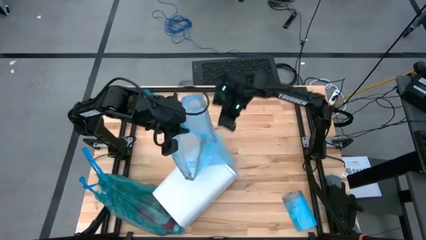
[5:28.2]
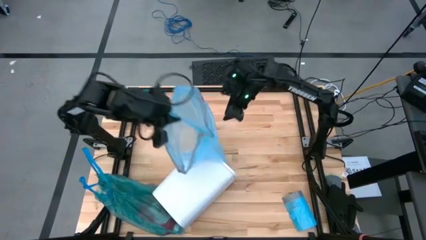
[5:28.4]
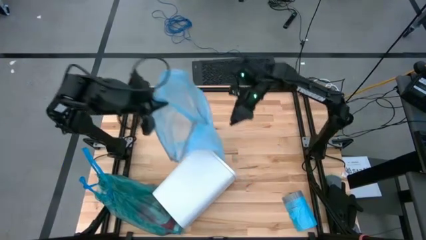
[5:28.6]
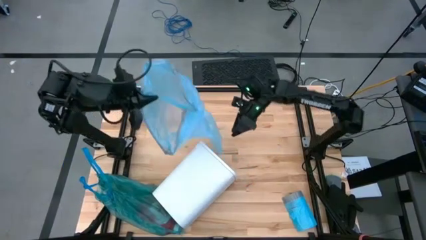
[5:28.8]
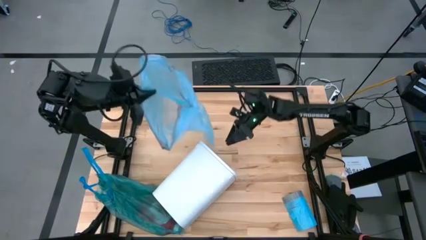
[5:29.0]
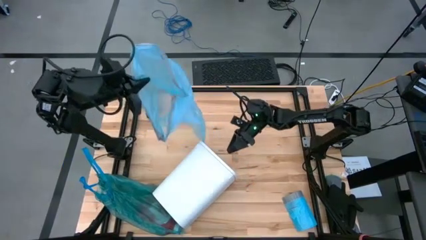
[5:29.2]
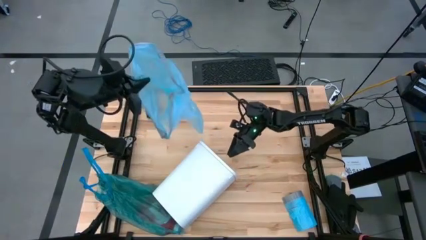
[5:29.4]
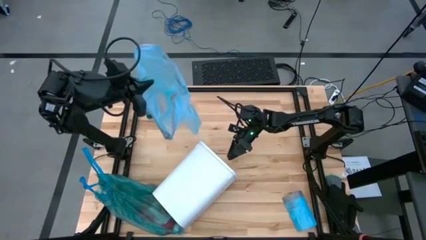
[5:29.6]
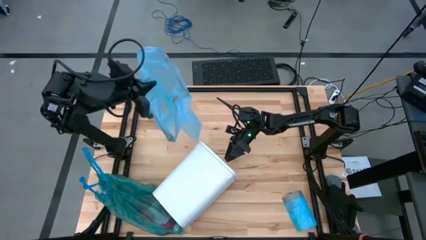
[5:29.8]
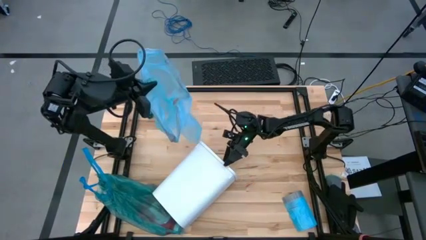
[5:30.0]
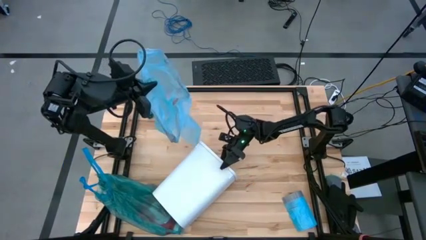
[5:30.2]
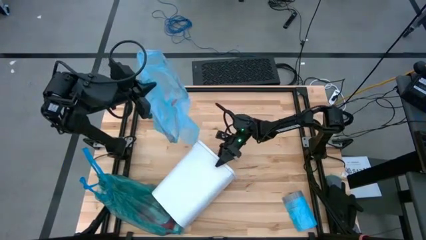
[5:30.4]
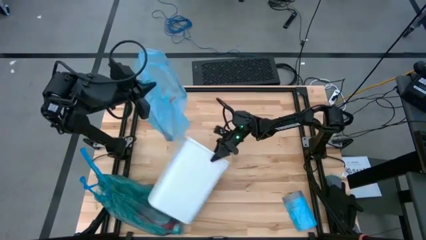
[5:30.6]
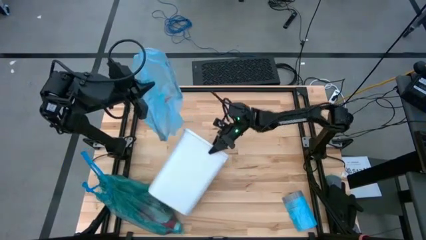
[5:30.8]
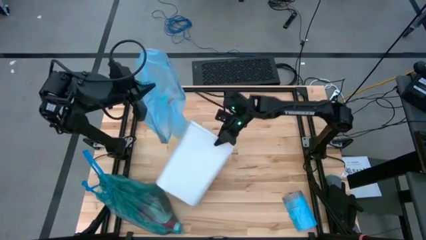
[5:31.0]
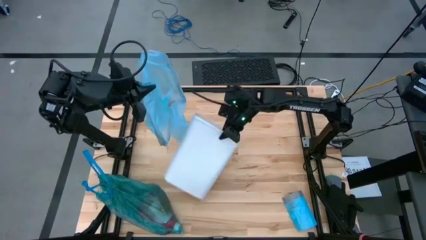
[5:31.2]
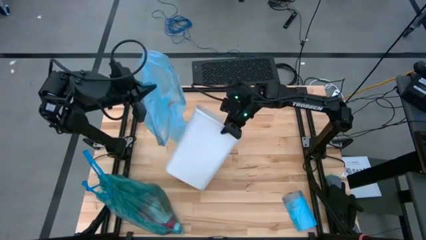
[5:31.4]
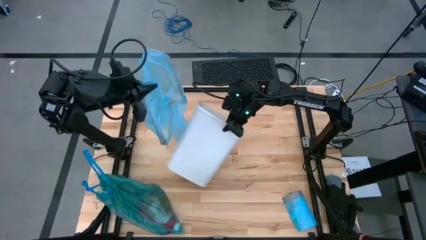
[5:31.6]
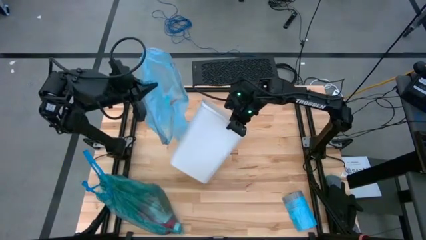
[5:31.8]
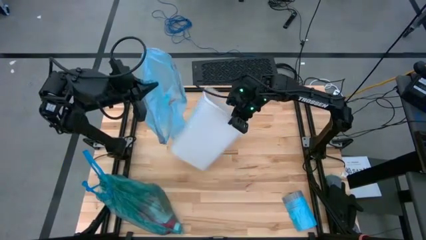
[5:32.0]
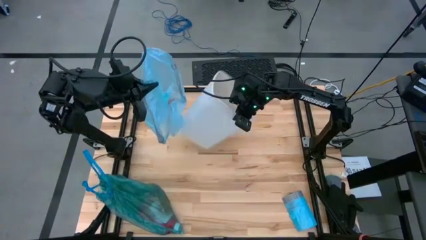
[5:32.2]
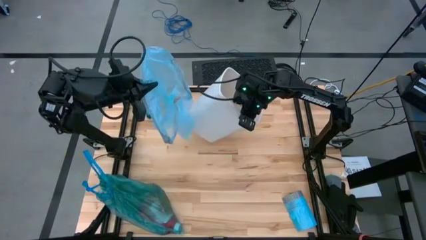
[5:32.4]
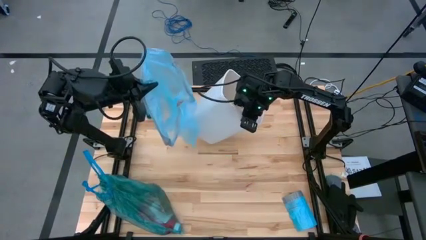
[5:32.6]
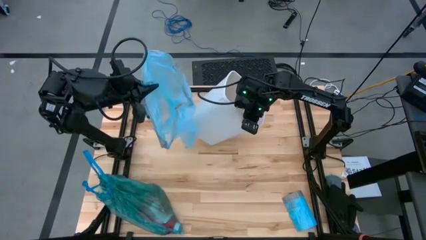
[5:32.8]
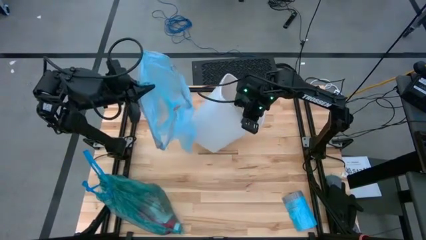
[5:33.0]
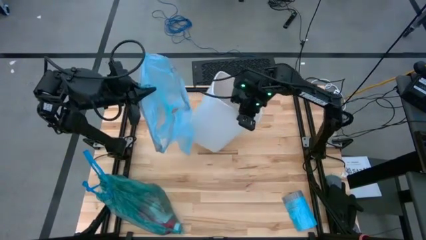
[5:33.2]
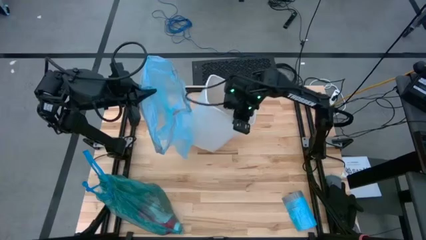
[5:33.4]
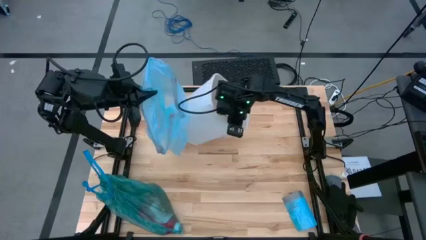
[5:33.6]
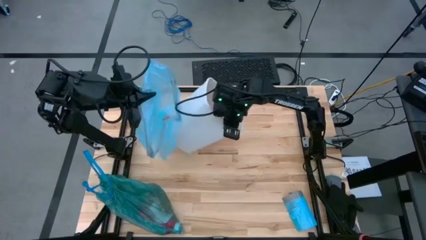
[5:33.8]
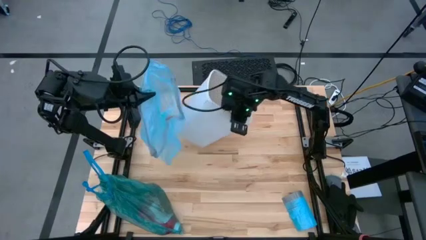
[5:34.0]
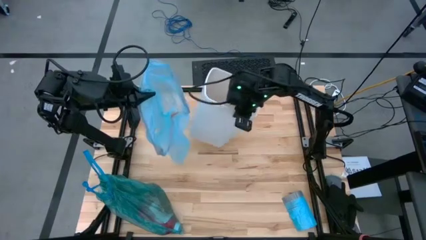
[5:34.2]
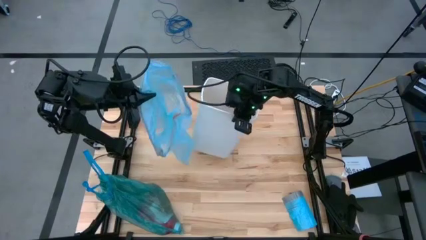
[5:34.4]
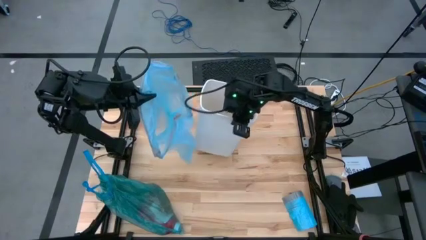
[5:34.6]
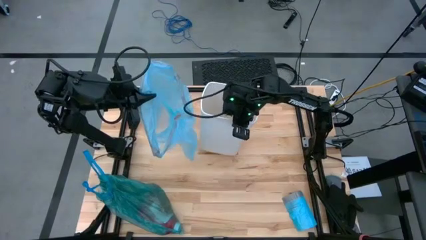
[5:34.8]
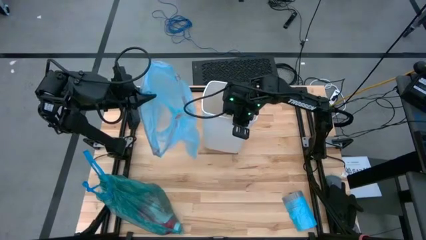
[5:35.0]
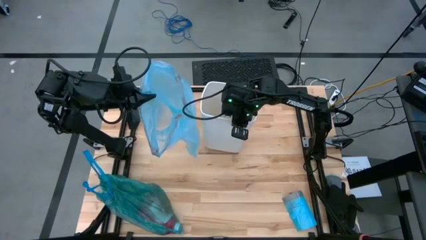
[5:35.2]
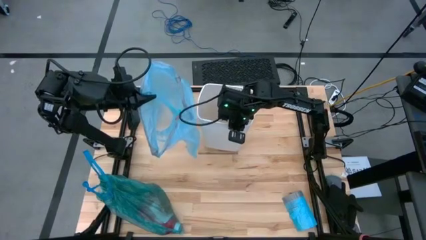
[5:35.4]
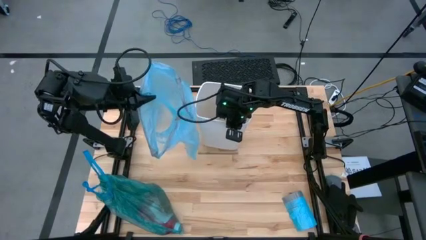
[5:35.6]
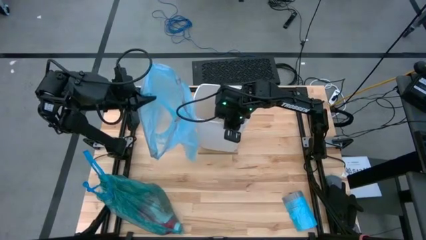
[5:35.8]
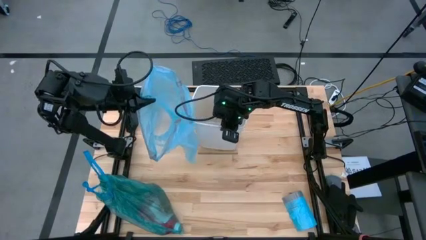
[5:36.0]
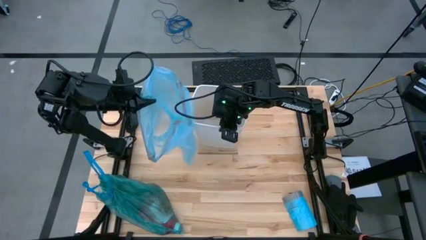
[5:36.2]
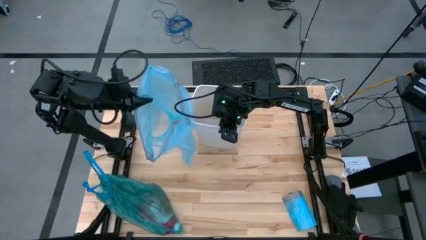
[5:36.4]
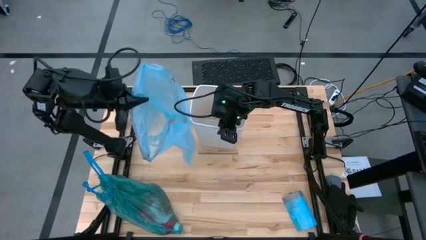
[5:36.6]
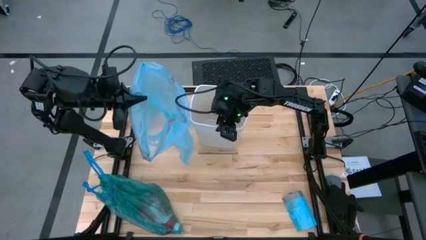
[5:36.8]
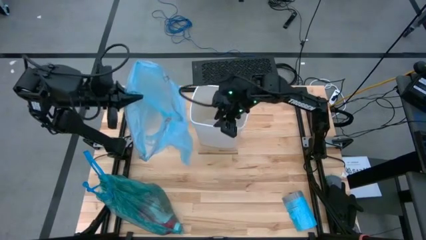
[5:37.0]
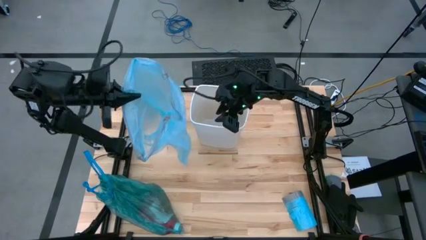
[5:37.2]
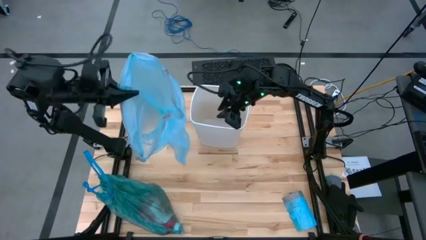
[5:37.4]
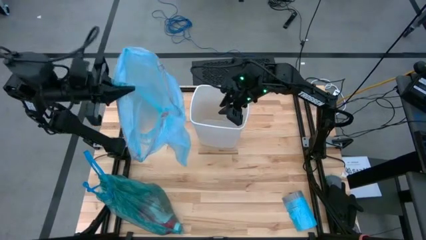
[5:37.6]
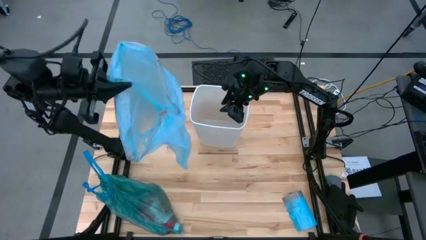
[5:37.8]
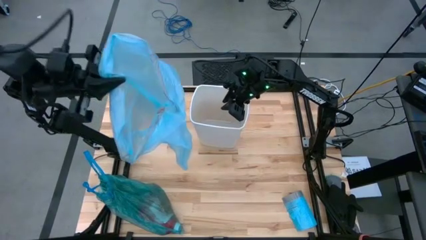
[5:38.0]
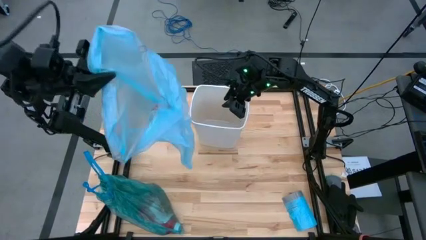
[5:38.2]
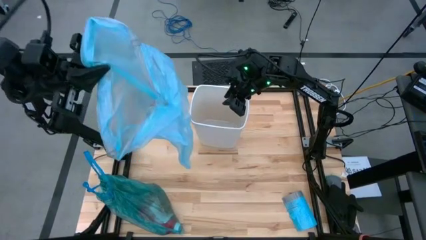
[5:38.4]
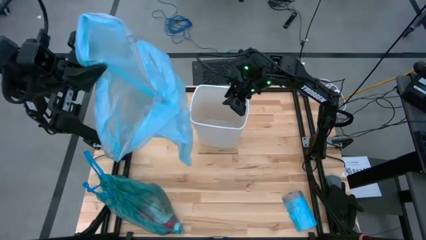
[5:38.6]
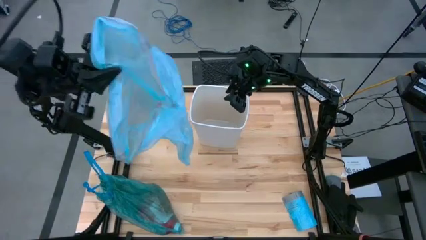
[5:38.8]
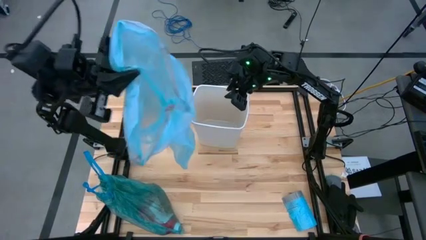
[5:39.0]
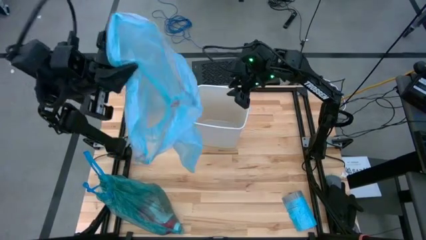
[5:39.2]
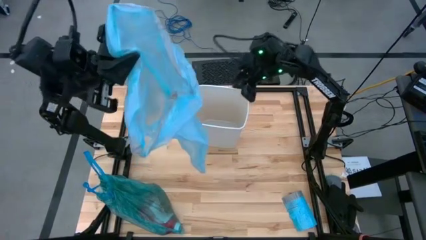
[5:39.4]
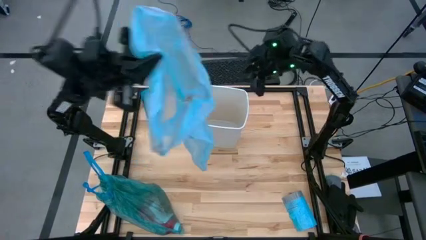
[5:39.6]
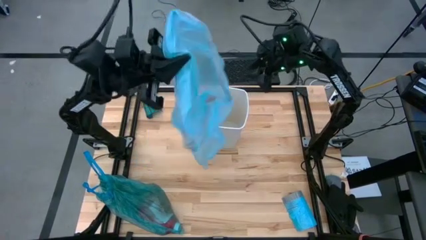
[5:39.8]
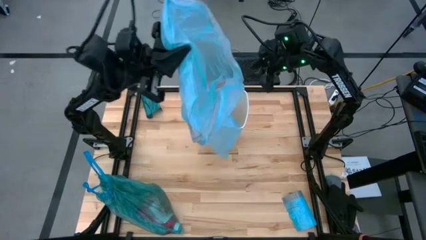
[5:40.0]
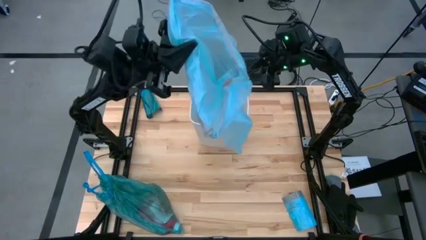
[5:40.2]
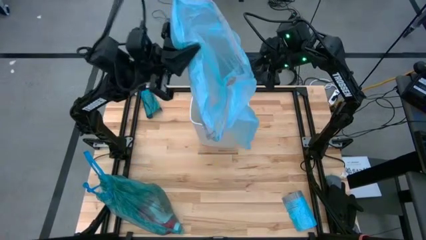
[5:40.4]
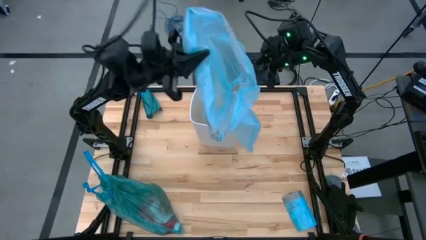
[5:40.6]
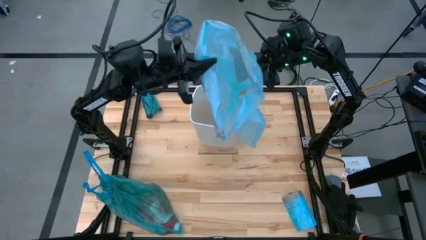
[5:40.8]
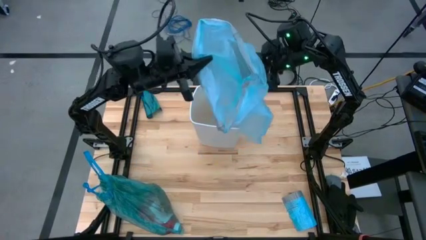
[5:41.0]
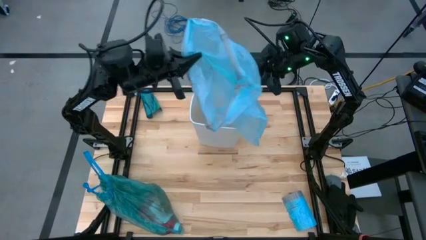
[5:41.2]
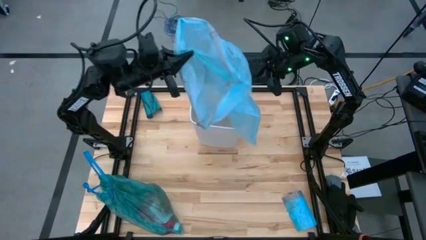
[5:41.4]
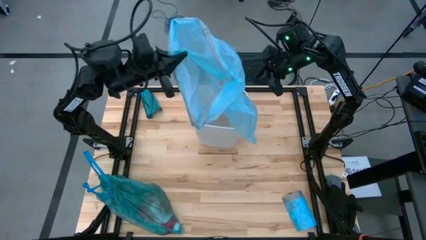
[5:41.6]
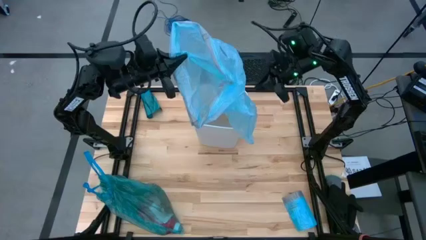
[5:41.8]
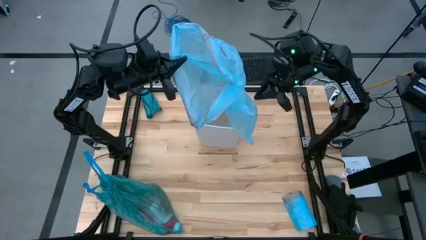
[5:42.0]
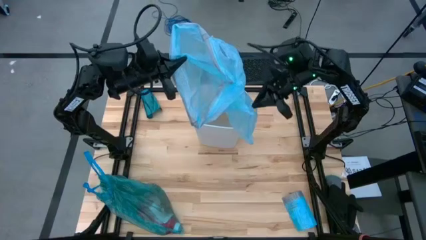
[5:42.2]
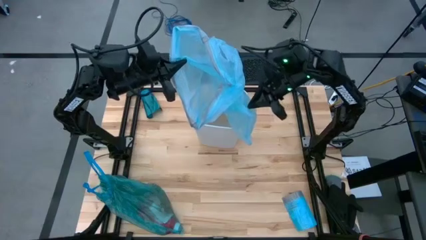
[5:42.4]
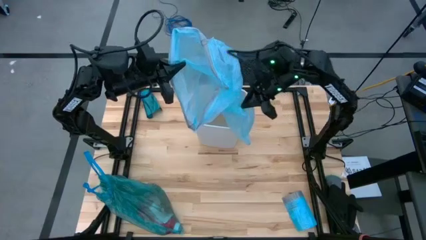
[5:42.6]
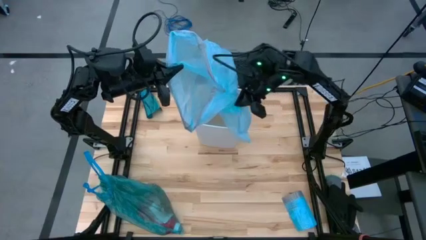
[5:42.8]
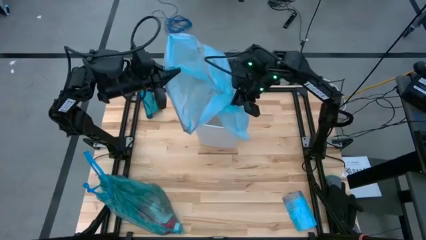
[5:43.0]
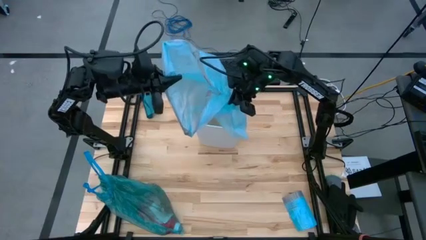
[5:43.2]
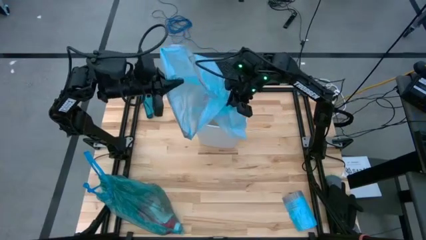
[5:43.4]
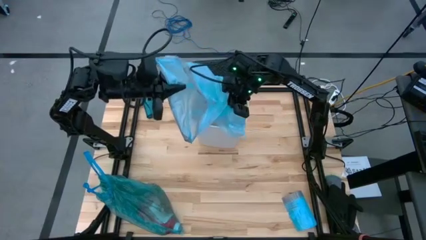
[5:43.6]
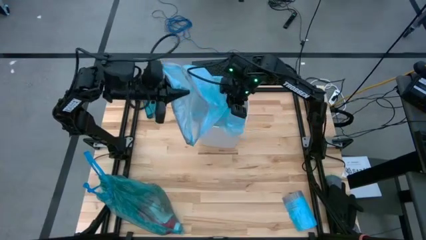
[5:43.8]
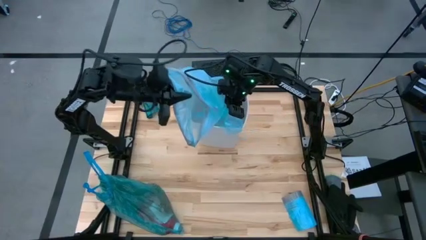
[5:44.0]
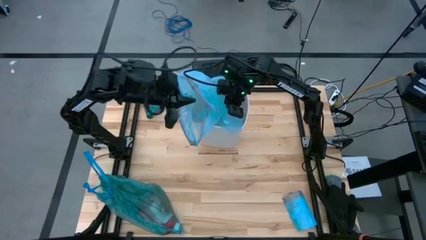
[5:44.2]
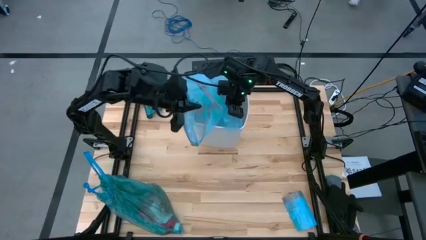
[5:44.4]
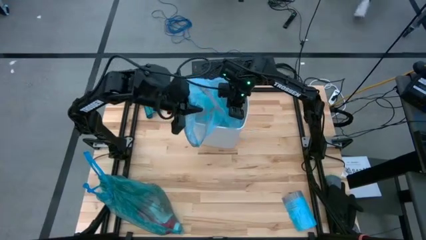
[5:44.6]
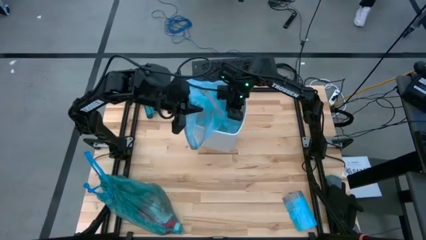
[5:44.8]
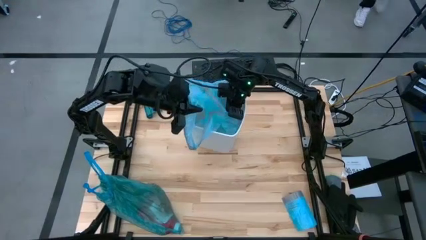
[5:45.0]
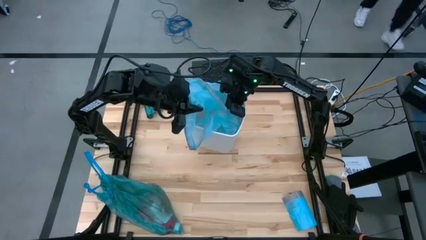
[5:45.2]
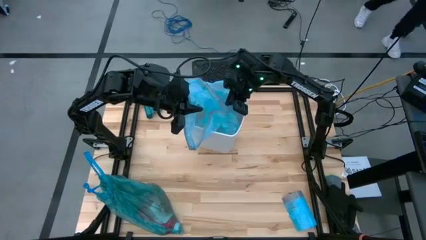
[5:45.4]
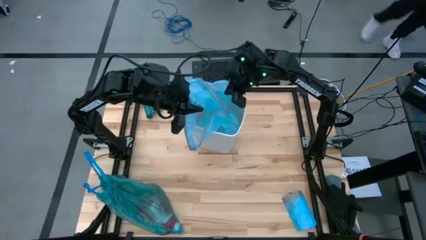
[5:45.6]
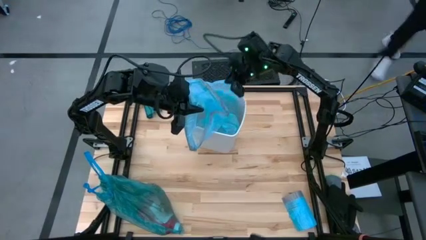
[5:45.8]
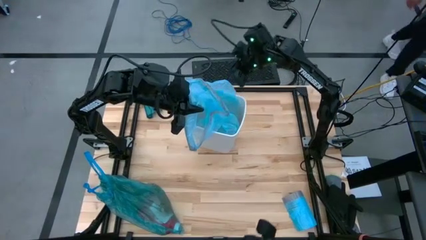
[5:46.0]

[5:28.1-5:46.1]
Task: place trash/remove bag and relplace
Insert the new blue trash bag into the white trash bin
